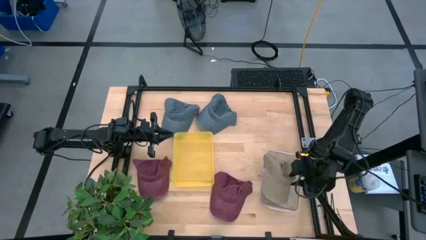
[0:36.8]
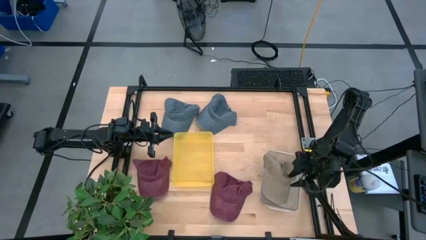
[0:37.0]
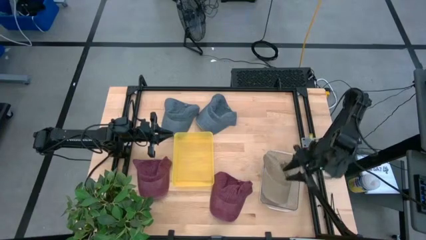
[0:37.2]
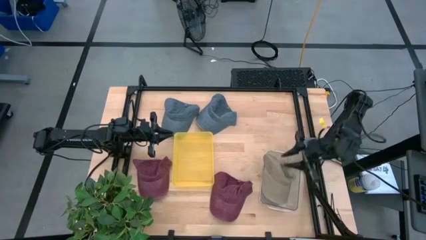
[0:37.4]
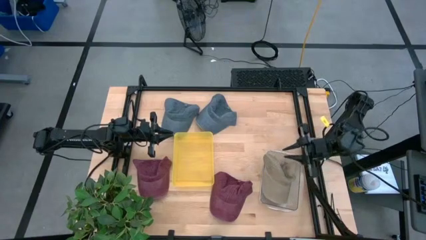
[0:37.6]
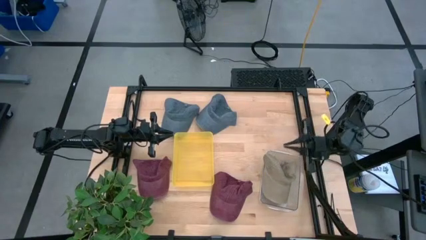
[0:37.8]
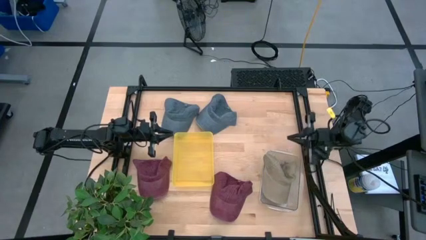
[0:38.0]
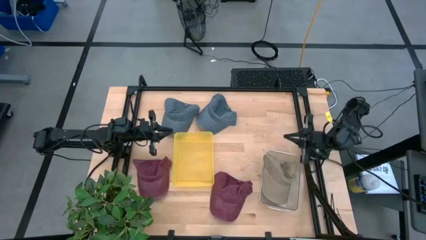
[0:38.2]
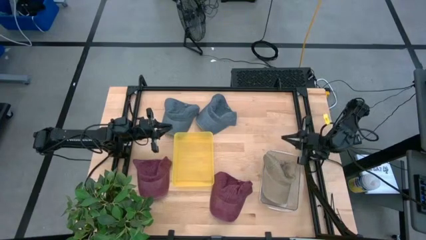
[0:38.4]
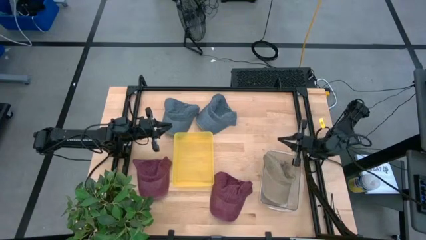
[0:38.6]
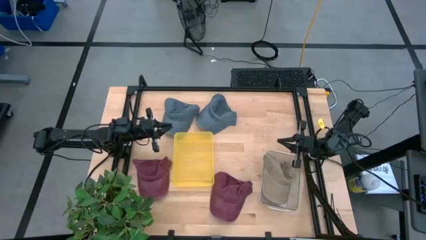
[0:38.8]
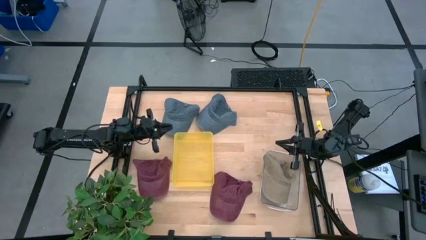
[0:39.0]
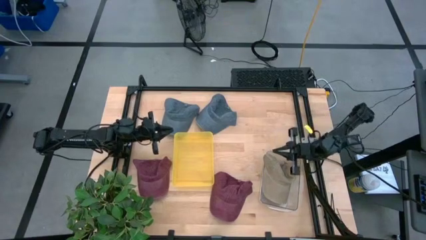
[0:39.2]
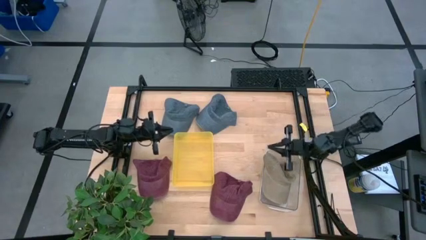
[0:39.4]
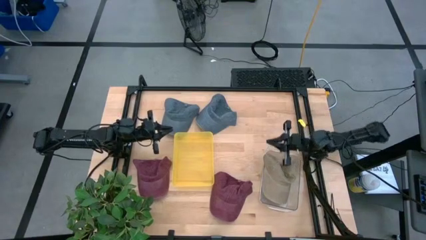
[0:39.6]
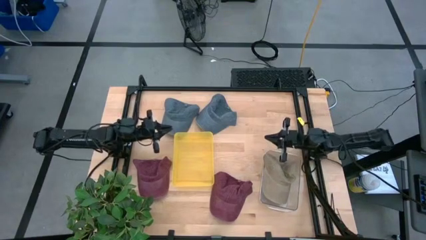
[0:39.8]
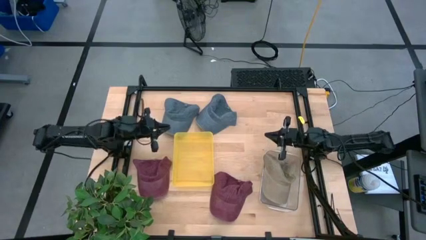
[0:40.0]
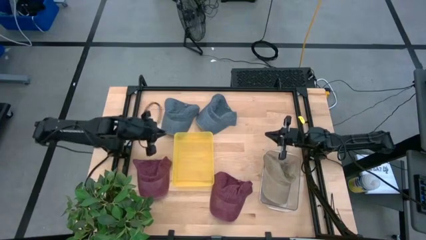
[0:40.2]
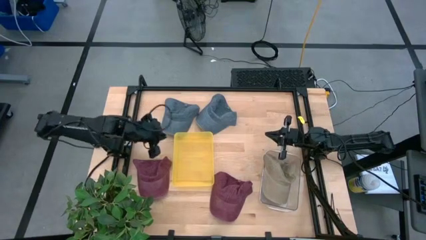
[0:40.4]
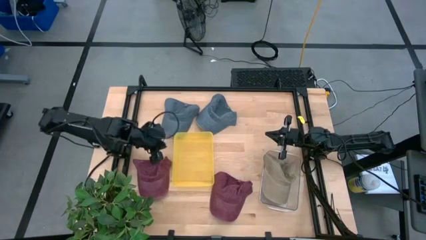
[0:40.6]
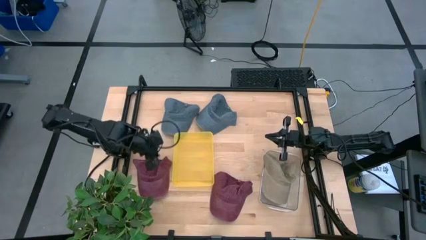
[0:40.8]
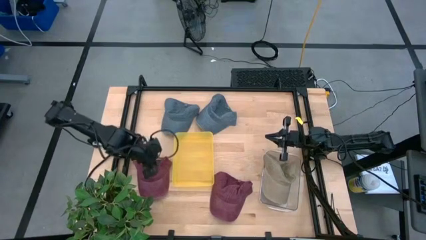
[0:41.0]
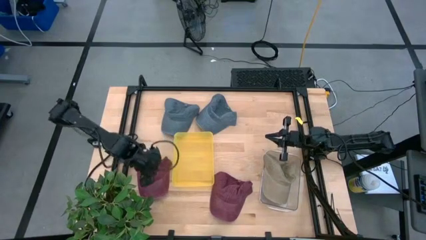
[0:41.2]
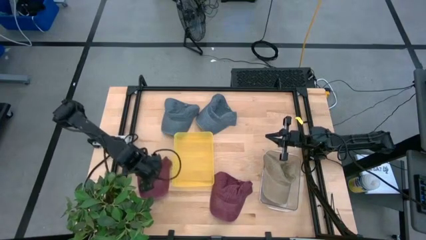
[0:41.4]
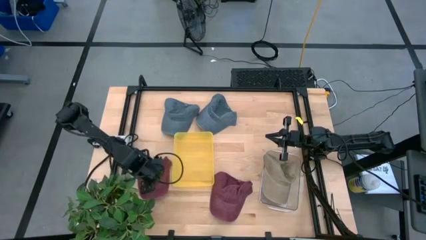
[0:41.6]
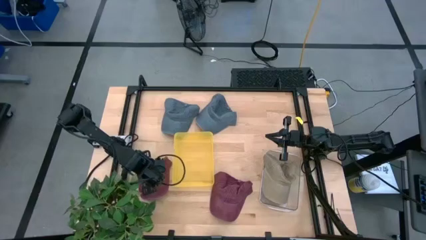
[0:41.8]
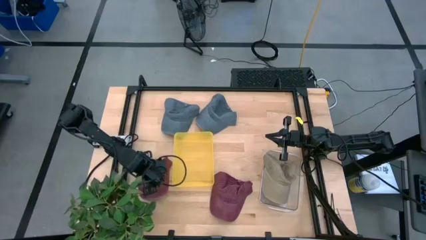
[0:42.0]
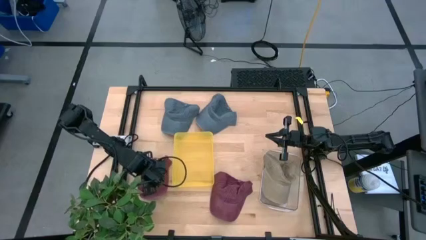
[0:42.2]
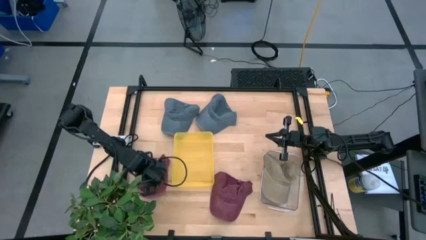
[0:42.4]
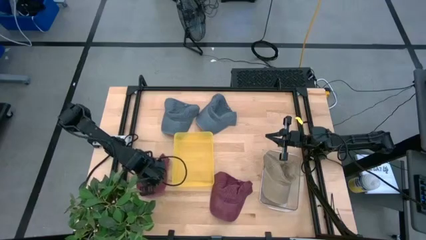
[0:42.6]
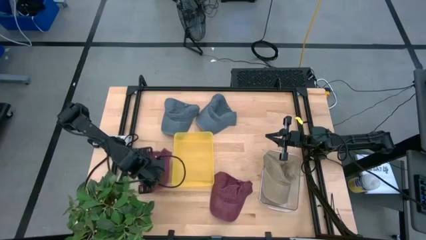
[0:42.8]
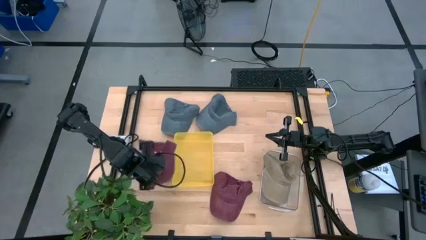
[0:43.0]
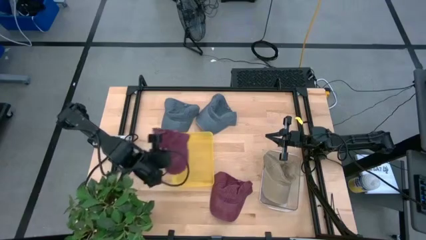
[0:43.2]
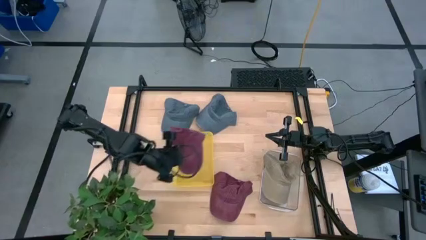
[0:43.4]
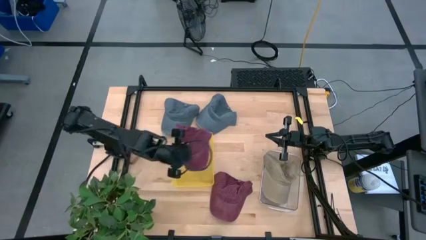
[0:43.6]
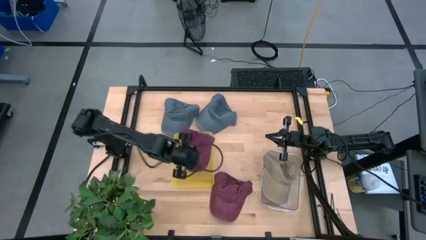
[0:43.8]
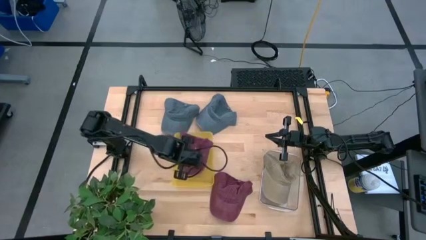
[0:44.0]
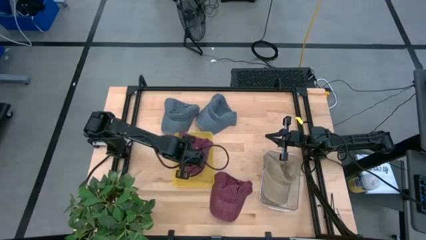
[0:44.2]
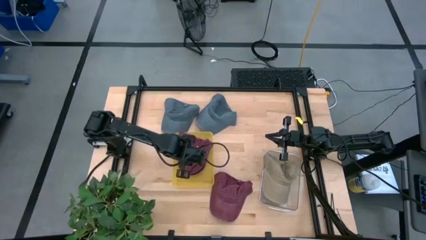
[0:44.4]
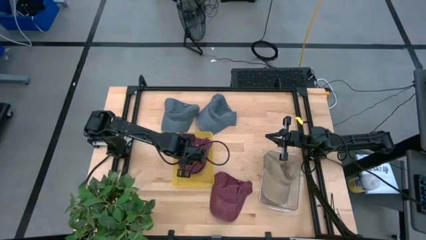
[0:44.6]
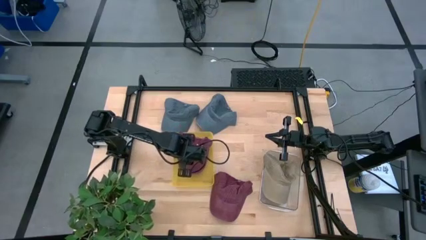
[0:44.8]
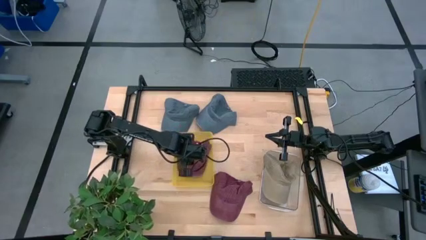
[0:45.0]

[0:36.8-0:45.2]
Task: Pick & Place hat
Put the left red cap into the yellow bin

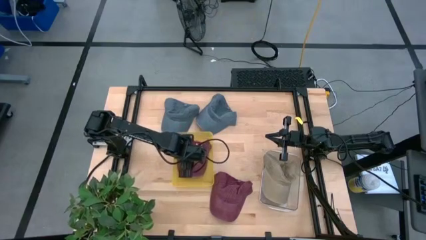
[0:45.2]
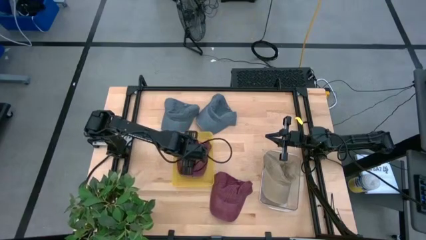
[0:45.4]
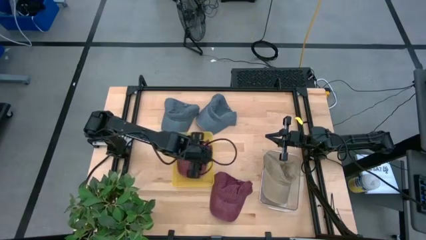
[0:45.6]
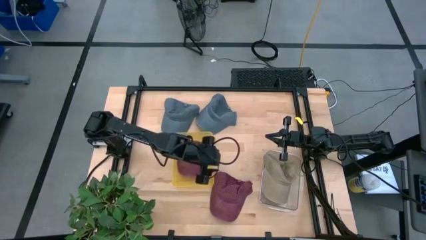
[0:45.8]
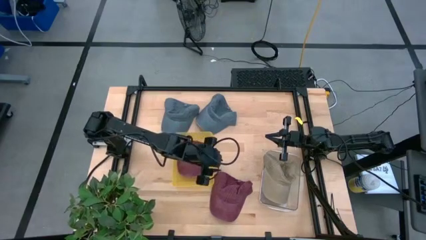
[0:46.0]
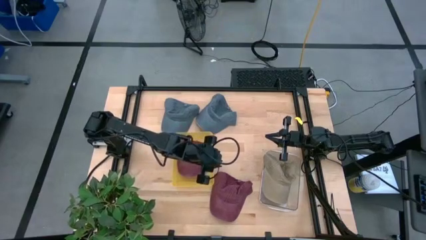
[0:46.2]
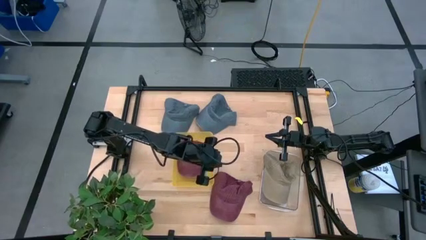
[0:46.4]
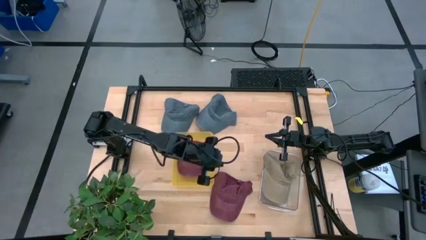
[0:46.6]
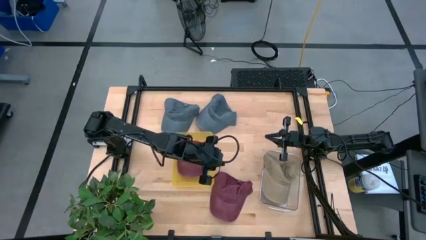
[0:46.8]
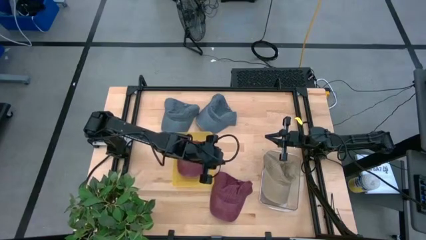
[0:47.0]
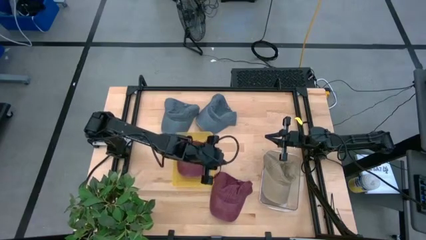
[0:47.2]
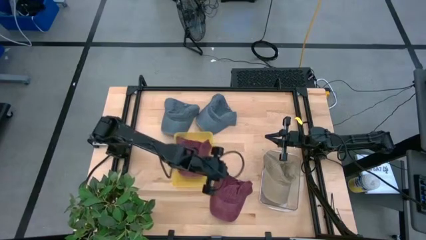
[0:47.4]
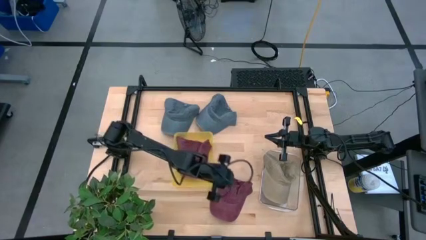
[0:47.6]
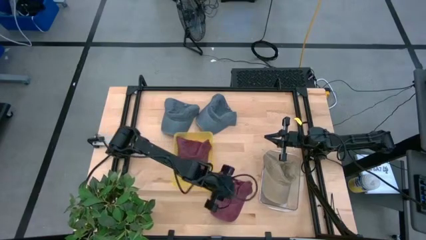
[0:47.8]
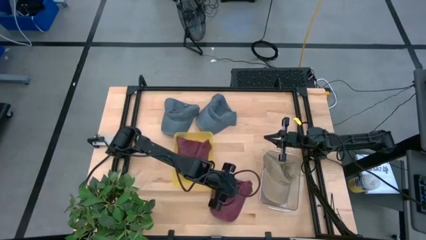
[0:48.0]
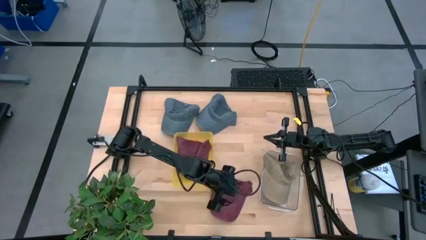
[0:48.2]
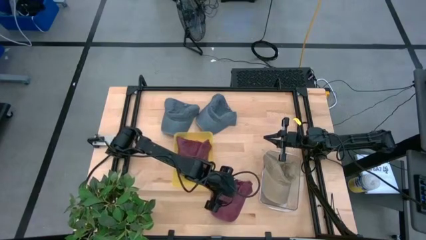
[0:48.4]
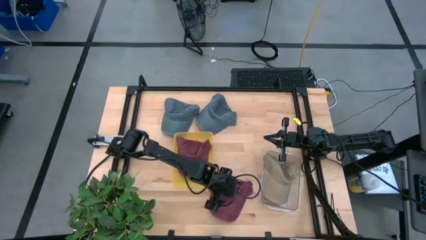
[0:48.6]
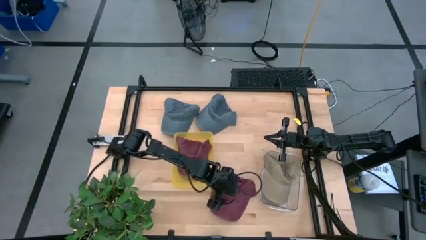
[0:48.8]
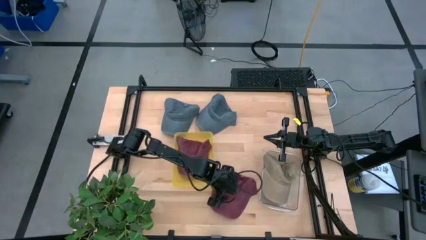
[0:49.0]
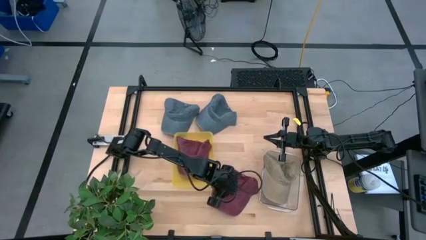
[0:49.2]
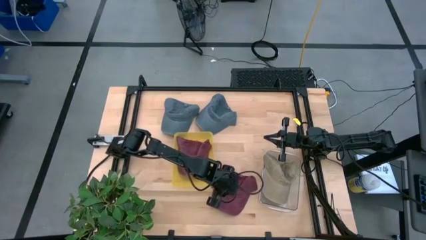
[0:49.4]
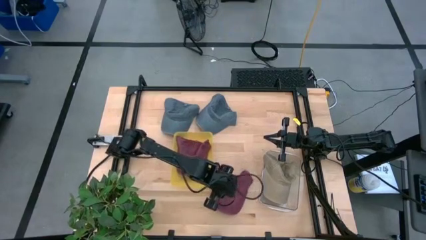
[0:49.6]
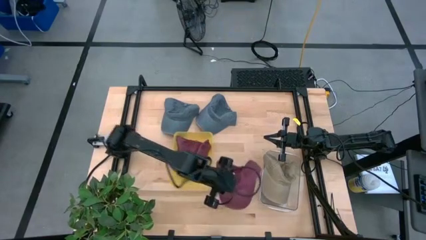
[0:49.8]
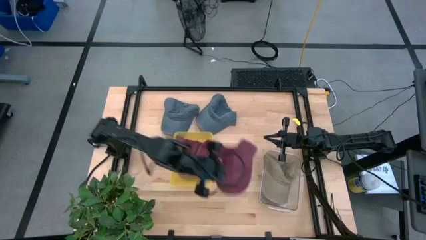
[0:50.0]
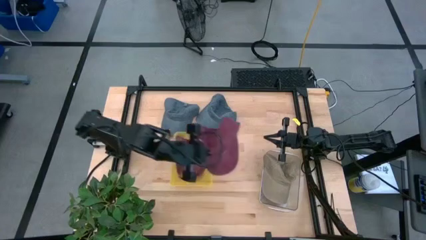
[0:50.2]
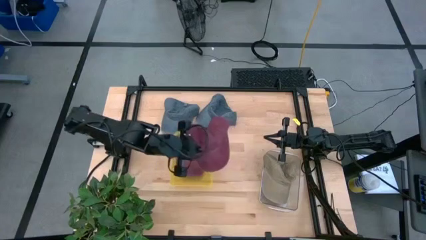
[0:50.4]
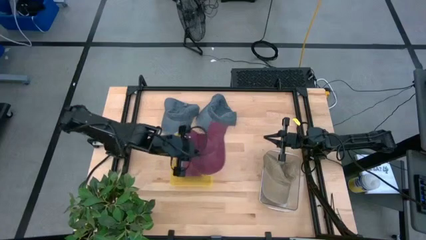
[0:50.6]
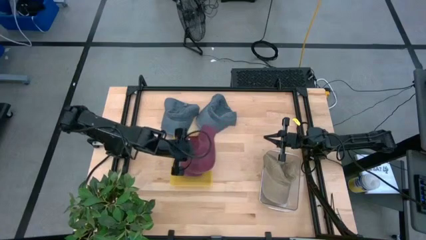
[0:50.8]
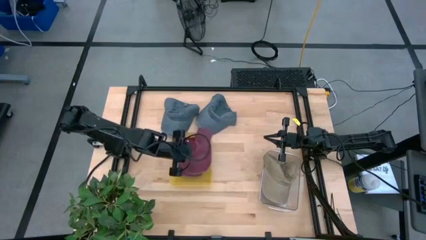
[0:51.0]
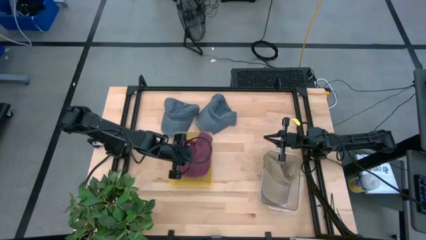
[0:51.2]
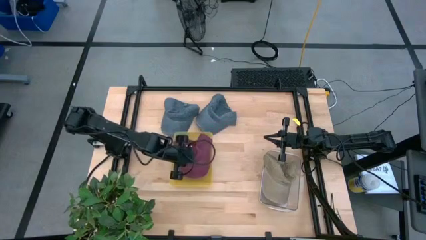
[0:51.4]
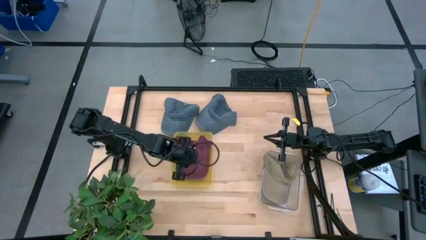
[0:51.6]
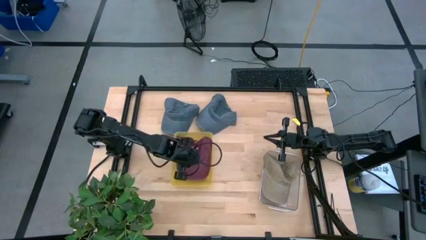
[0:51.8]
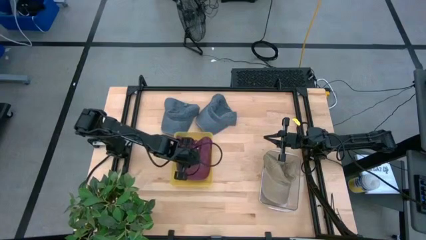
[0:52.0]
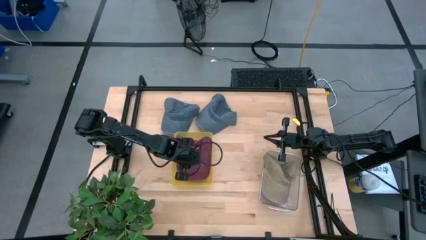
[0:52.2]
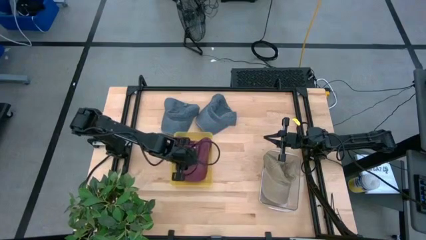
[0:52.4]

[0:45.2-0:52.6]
Put the red cap into the yellow bin
